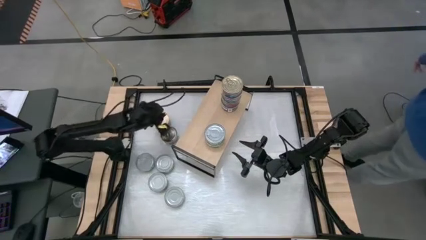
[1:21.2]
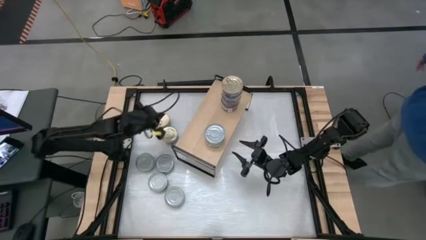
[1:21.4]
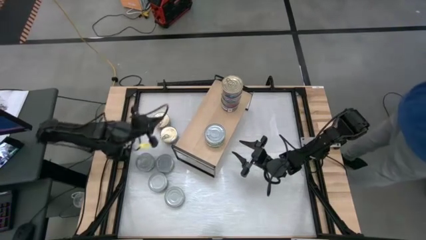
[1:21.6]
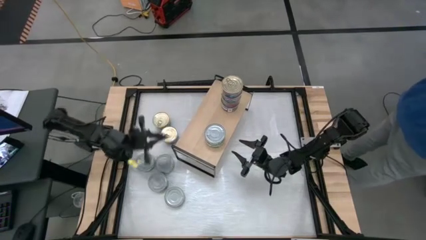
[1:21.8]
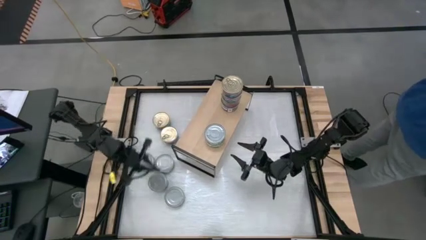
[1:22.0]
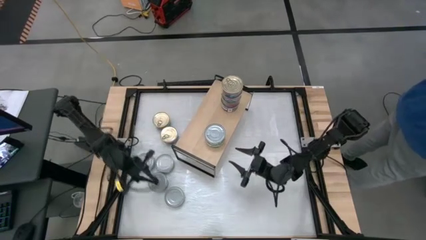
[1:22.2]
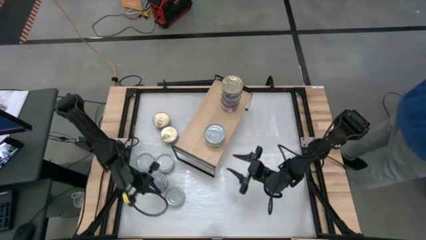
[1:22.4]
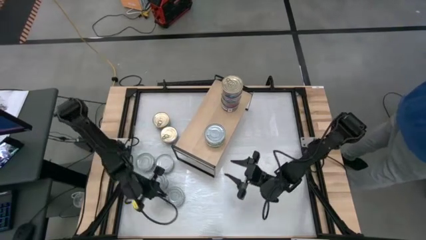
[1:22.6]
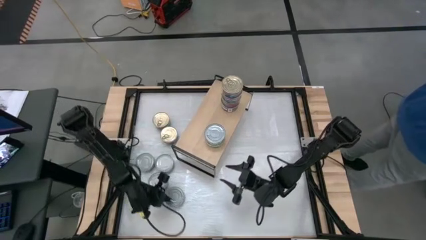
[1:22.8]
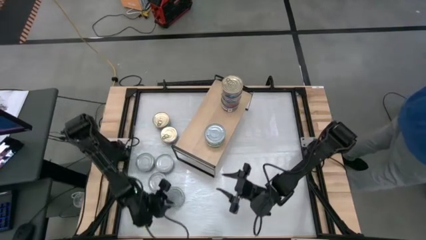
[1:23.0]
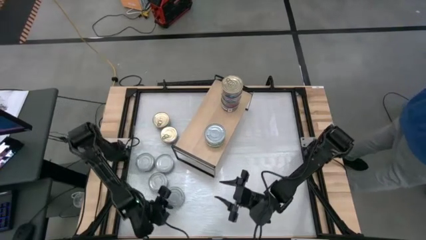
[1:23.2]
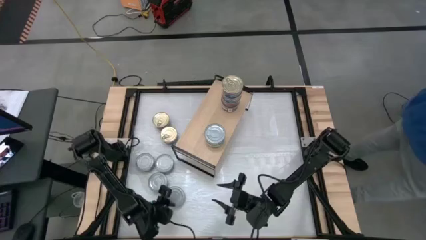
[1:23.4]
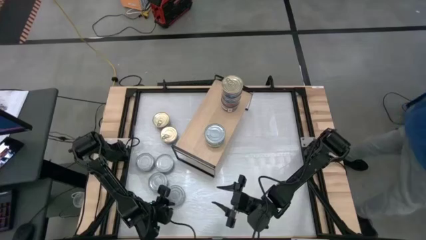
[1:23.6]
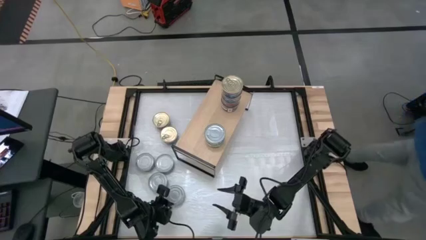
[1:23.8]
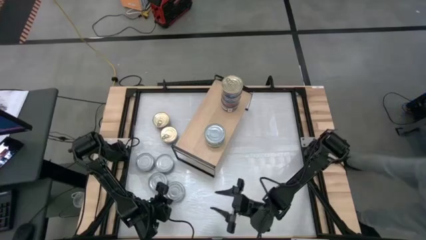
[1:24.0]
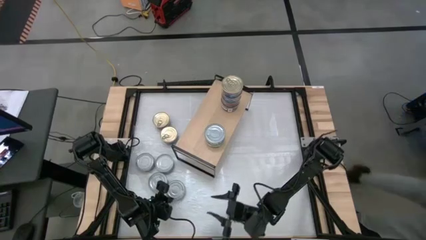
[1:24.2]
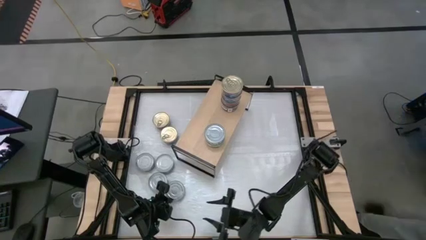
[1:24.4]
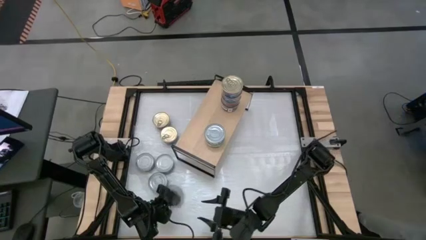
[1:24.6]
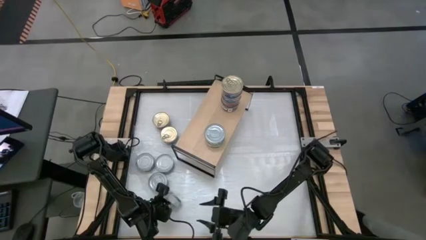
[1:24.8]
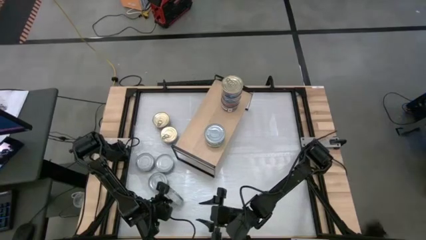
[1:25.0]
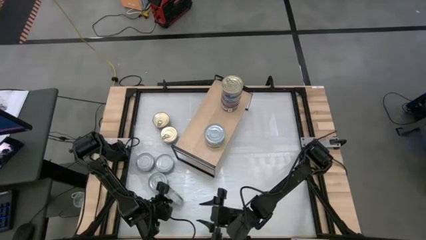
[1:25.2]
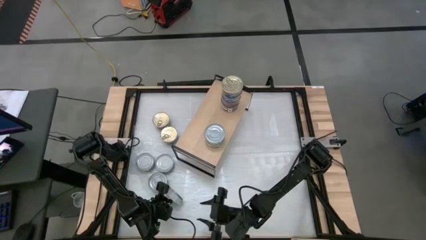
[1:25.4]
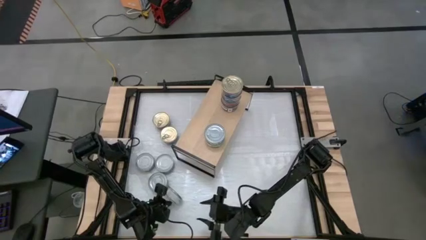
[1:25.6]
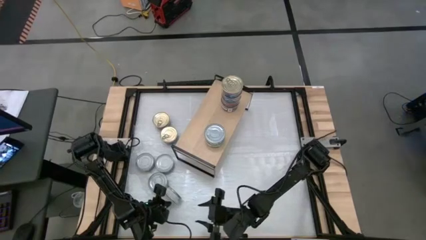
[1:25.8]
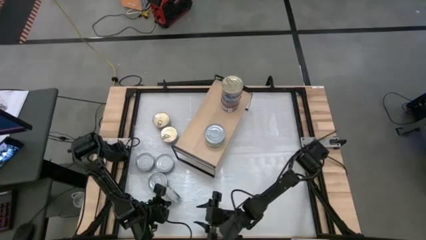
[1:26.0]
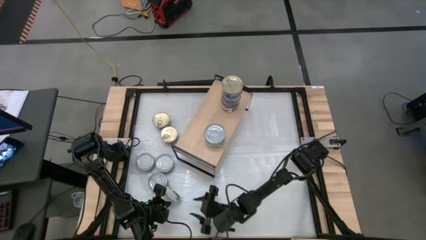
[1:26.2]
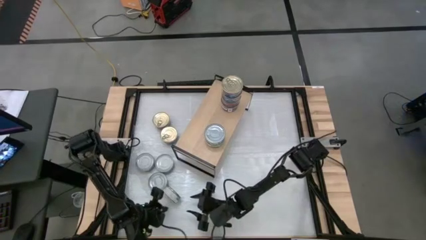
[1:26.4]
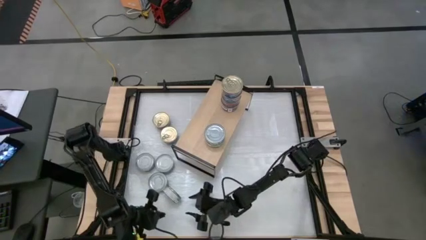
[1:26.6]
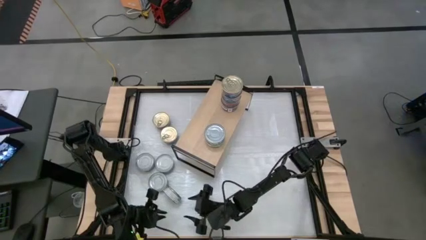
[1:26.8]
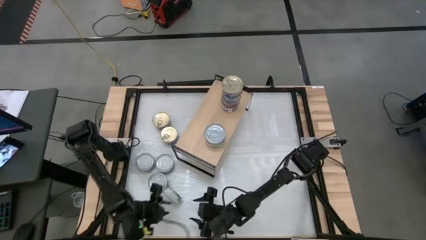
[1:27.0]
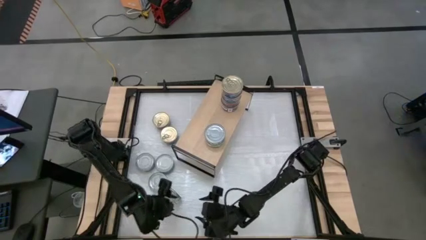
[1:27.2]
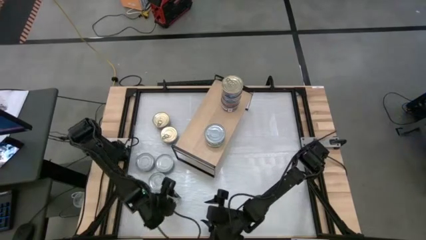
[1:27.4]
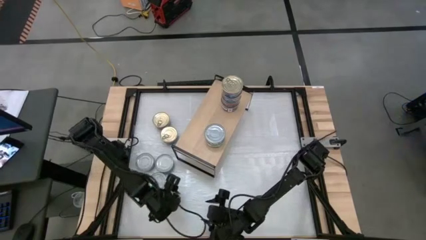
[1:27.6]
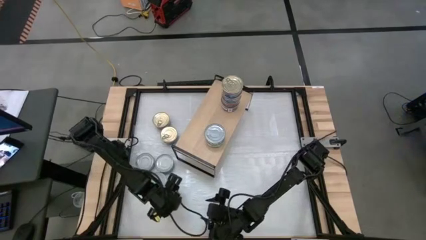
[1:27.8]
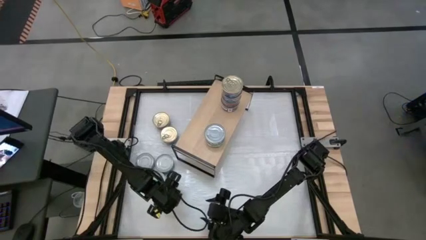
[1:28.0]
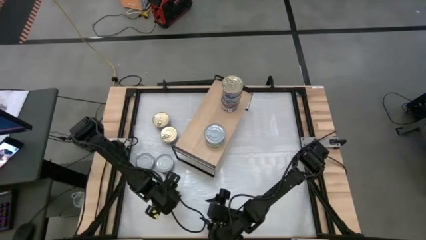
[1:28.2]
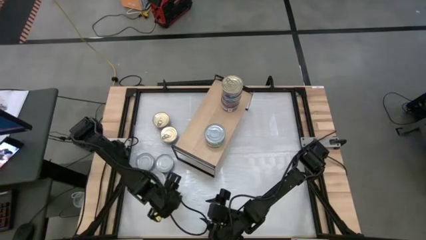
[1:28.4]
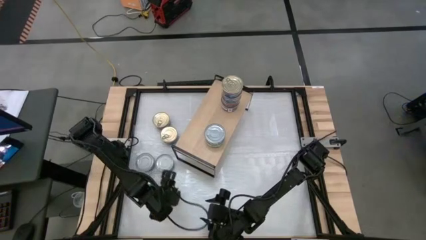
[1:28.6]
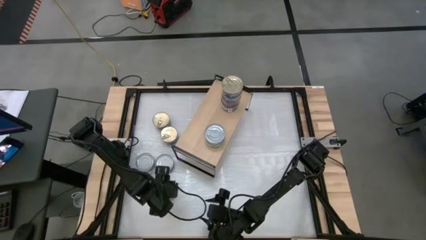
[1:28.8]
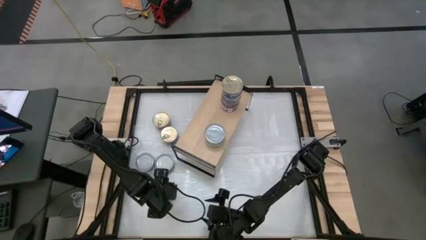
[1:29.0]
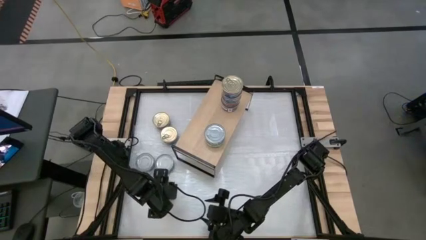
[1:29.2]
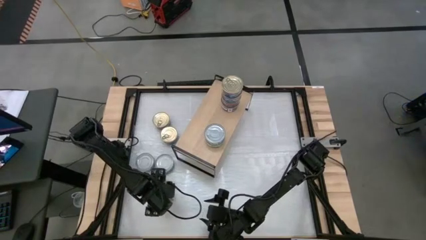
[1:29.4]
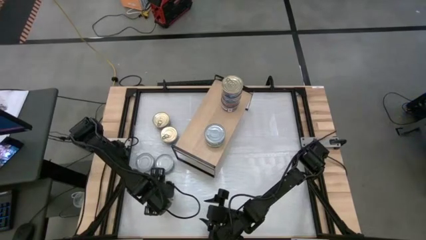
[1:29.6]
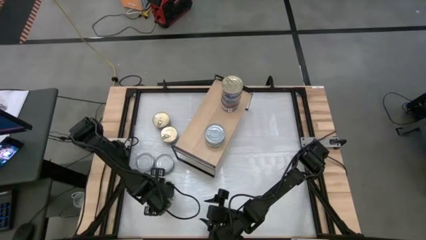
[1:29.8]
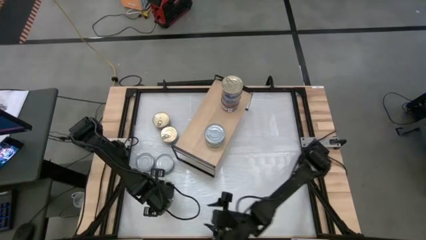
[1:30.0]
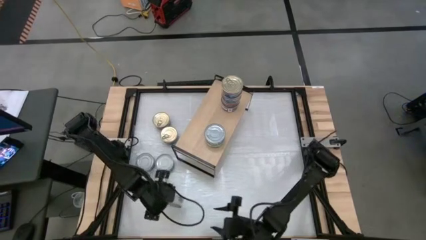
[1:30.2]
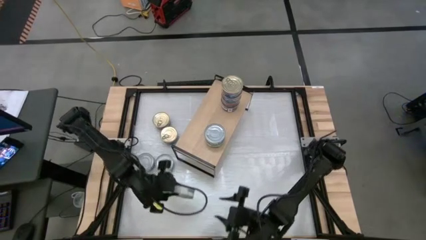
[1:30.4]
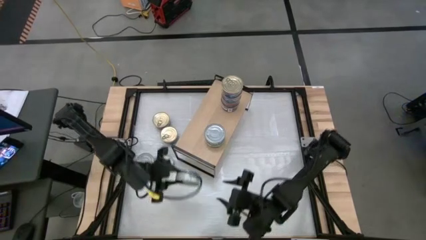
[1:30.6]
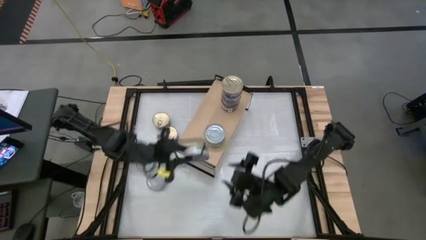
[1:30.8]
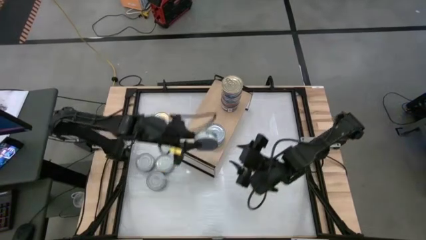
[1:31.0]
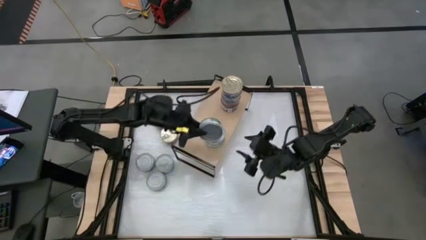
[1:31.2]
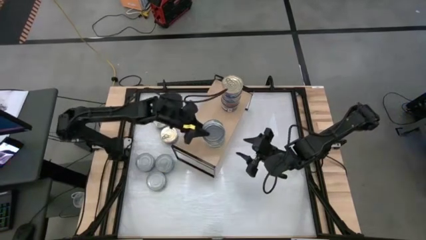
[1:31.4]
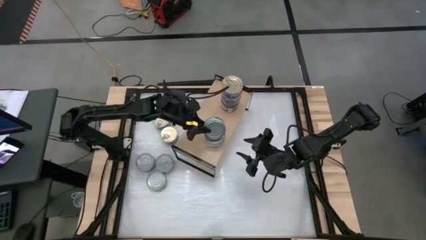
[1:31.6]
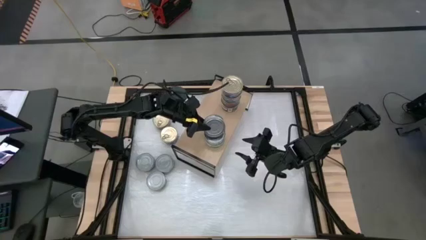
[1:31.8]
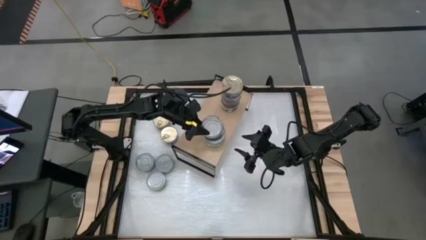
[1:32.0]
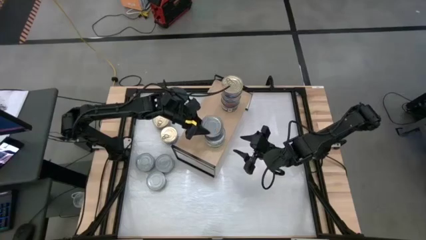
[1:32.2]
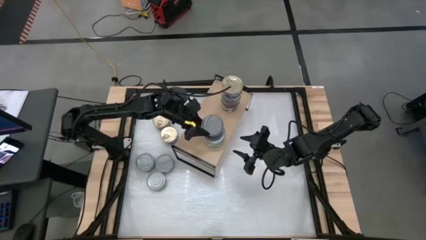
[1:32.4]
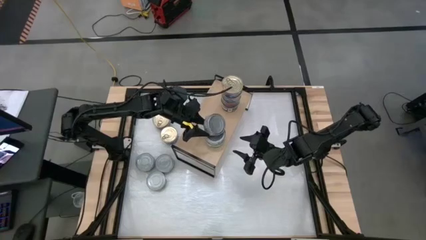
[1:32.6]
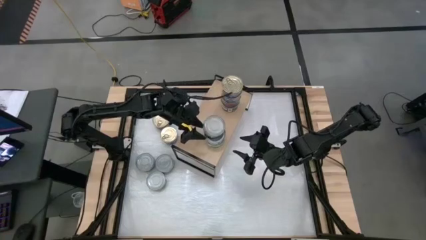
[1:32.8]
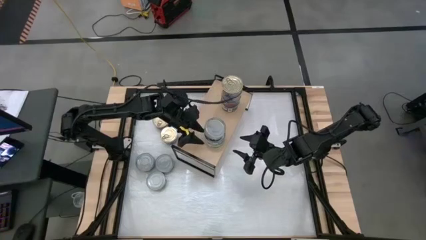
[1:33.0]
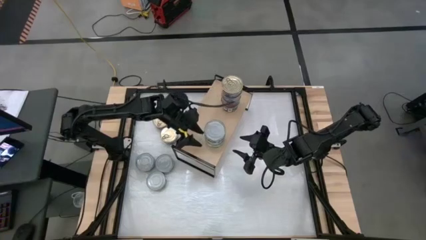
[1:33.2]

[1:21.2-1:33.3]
Task: Stack canned seafood by type on shelf
Stack the green tuna can on top of the other green tuna can
